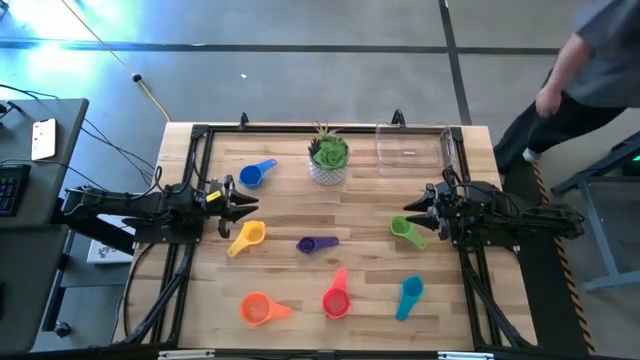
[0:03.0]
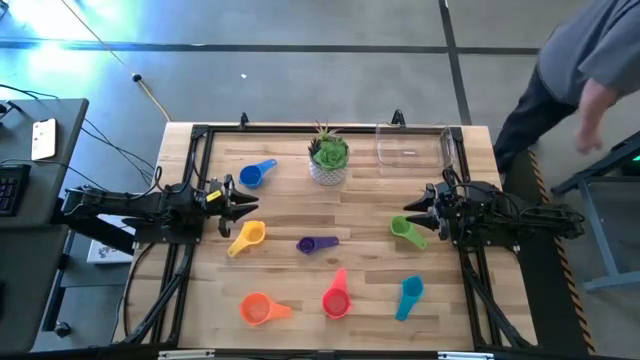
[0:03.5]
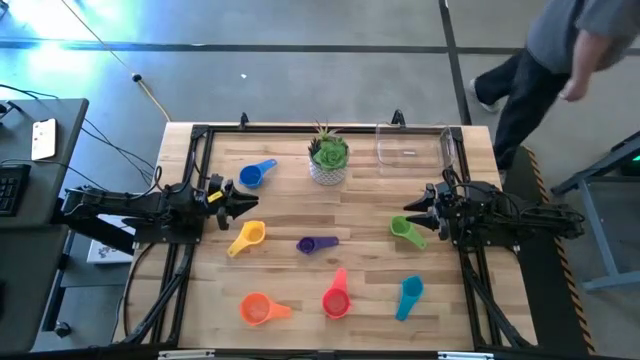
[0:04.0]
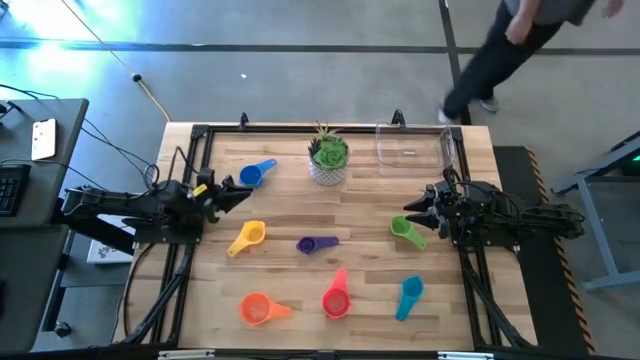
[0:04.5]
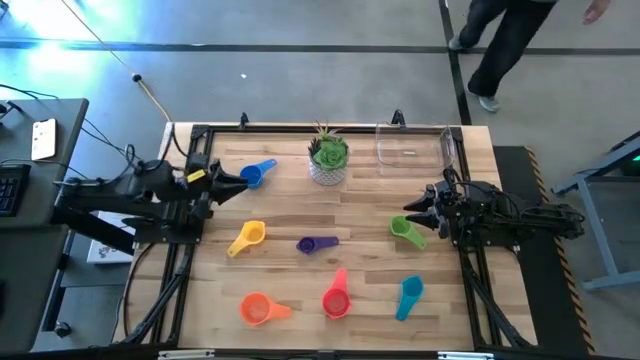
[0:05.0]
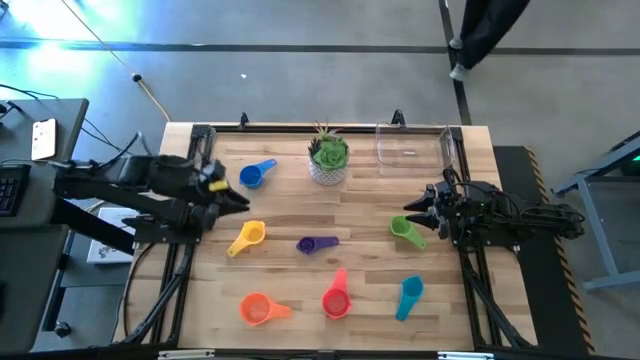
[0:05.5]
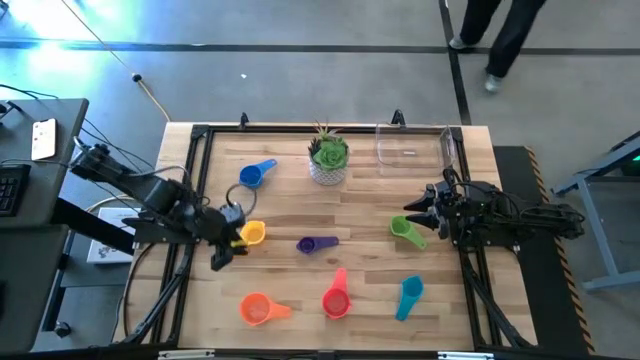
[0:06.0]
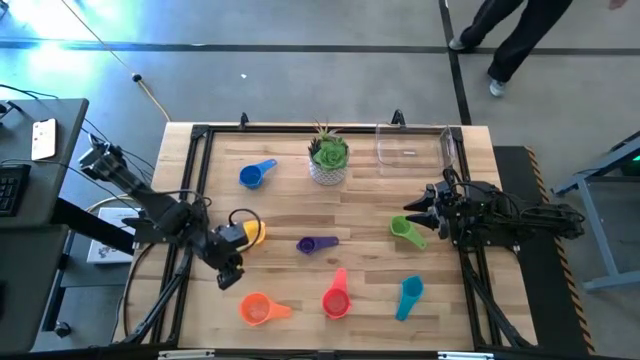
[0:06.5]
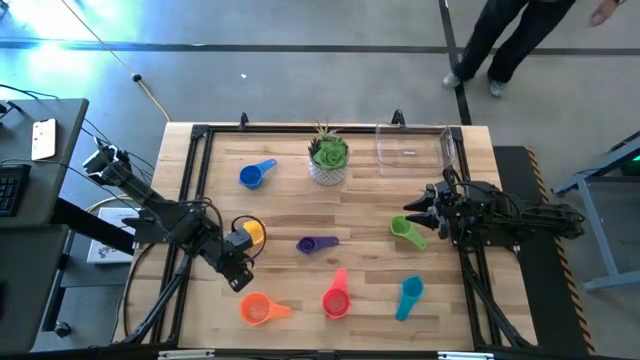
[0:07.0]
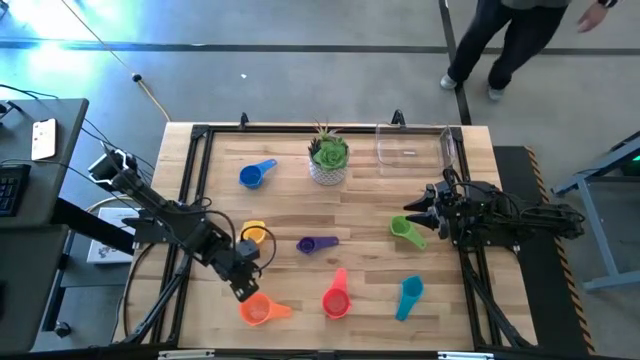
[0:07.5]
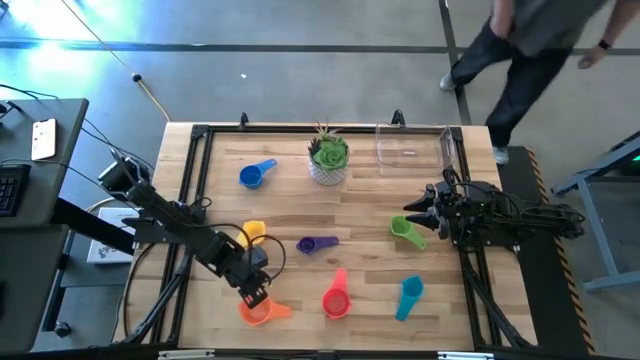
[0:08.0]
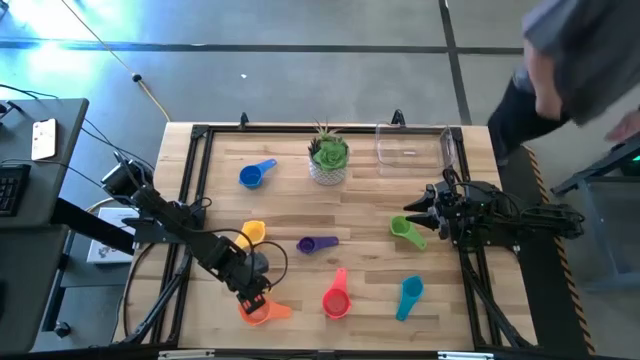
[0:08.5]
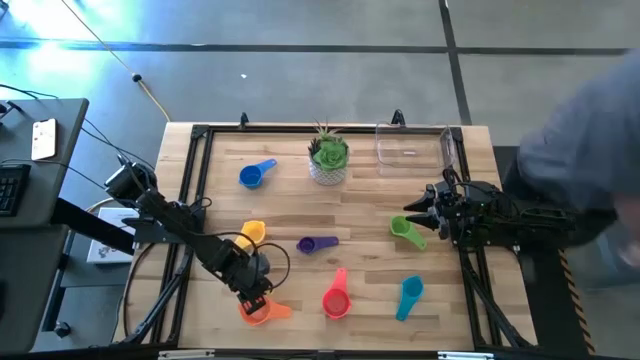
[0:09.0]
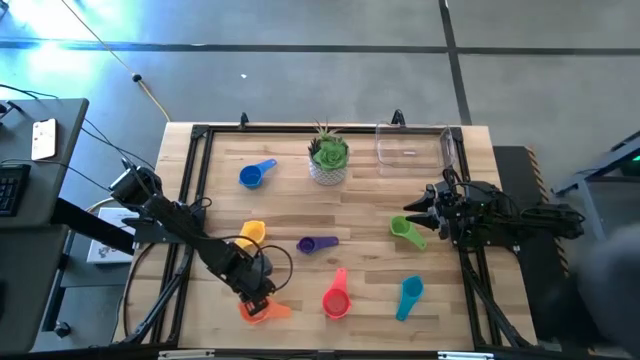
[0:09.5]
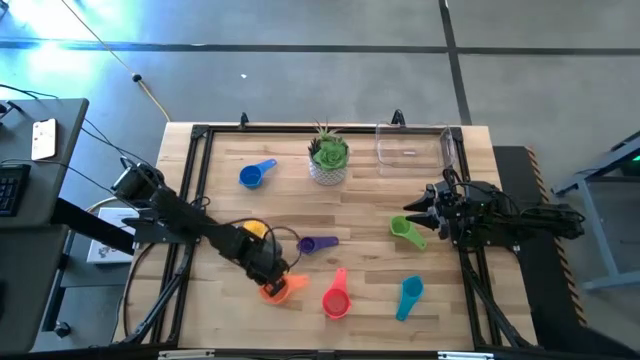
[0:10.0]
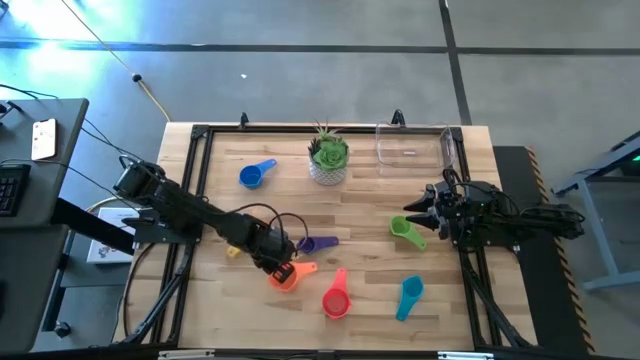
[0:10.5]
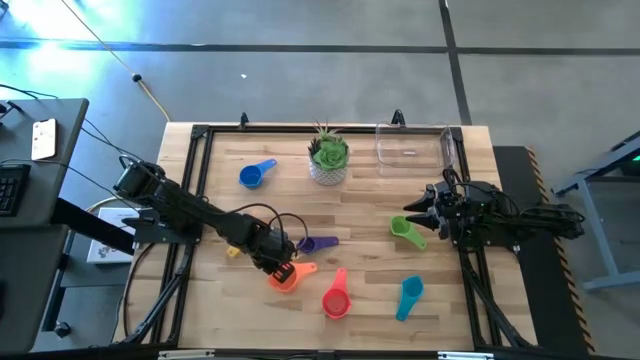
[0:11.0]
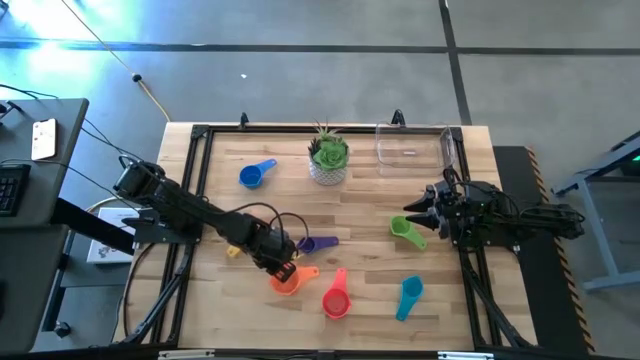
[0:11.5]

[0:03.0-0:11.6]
Task: Nest measuring cups in basket
Prepare the orange measuring cup

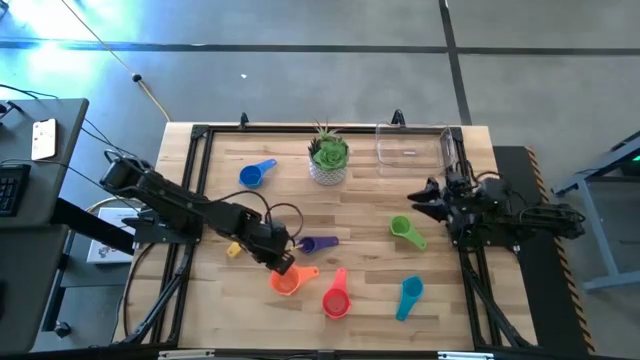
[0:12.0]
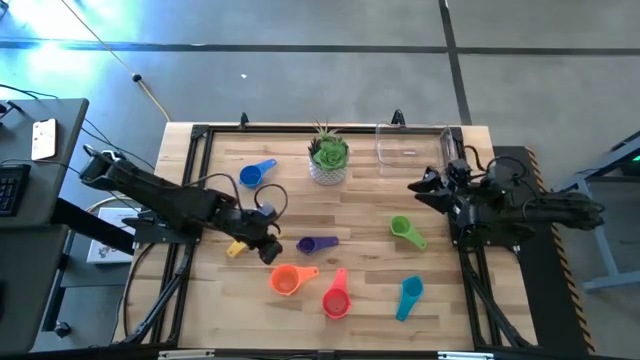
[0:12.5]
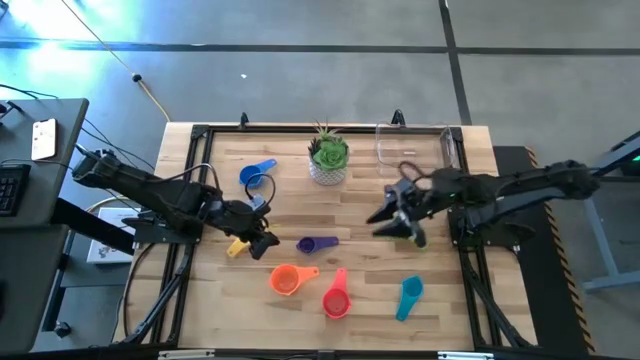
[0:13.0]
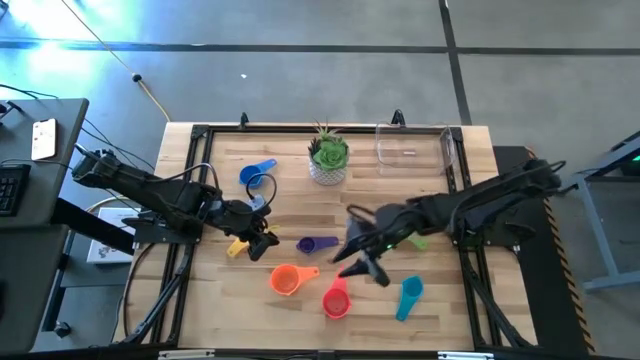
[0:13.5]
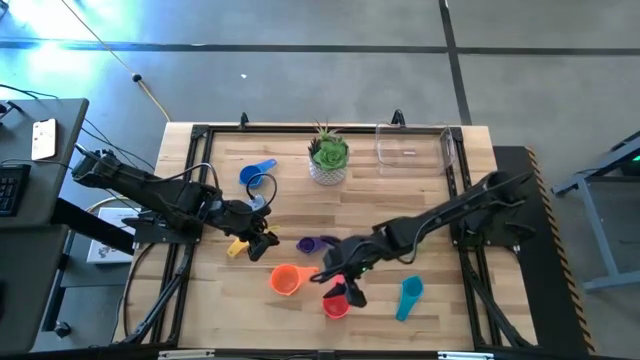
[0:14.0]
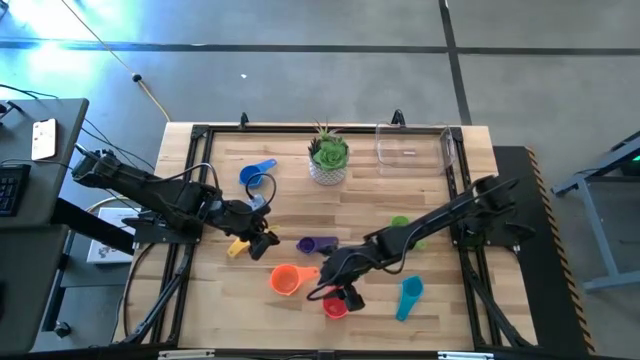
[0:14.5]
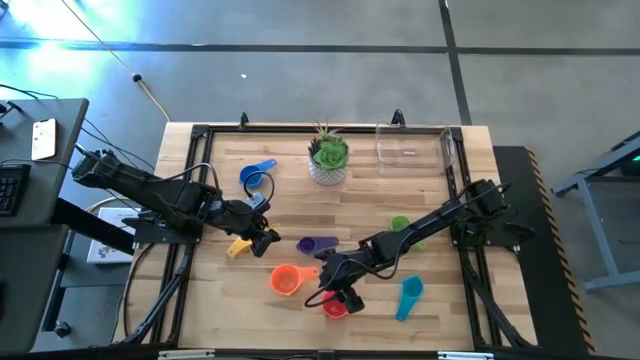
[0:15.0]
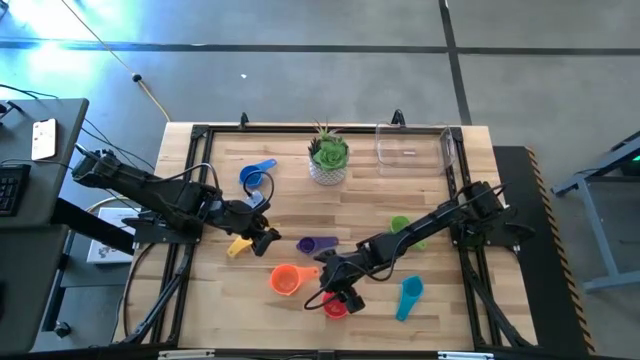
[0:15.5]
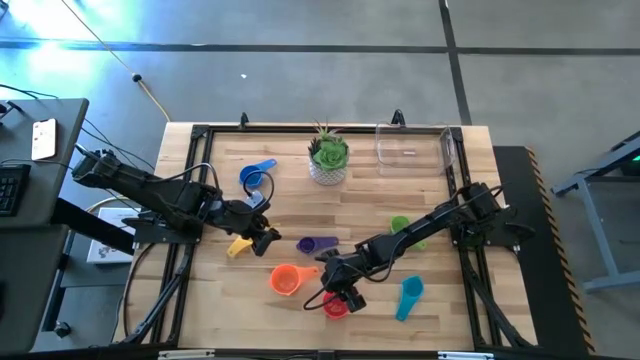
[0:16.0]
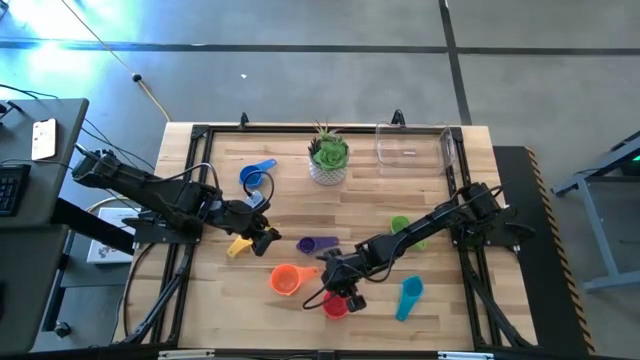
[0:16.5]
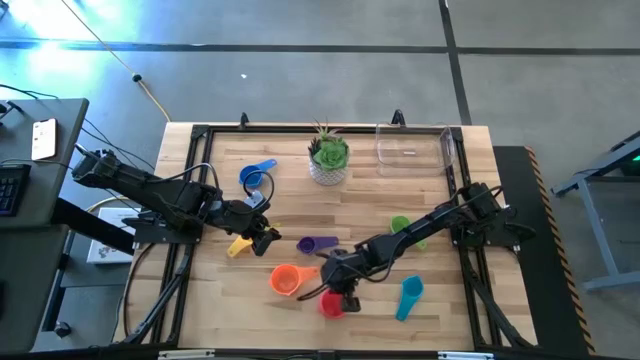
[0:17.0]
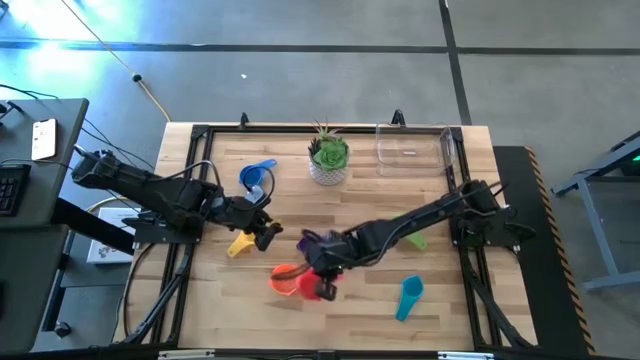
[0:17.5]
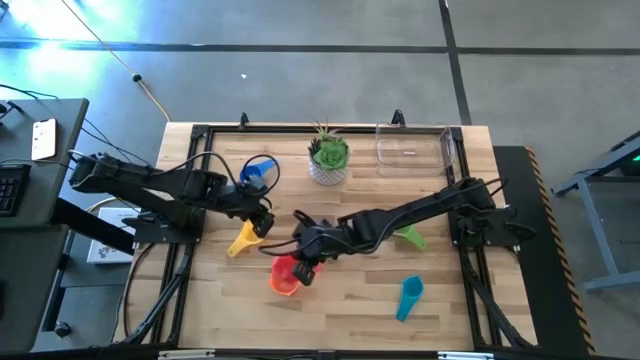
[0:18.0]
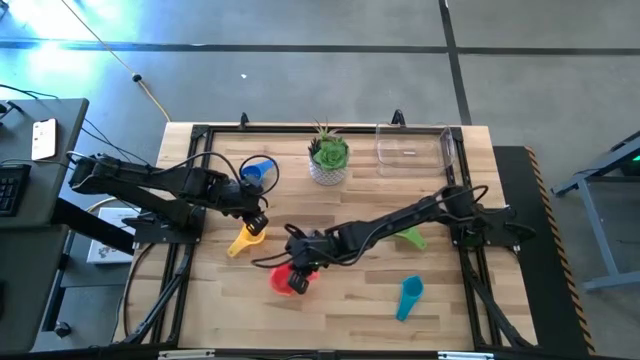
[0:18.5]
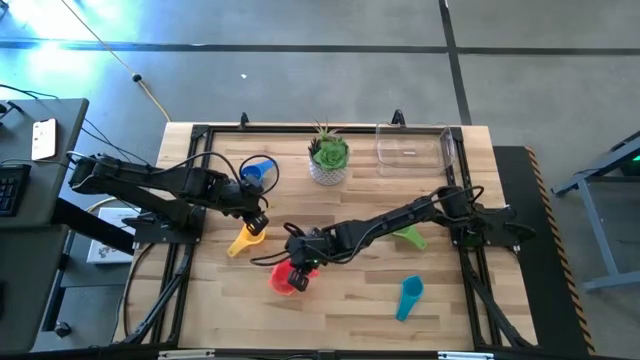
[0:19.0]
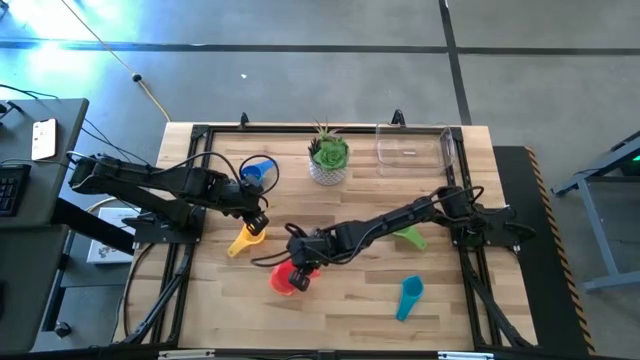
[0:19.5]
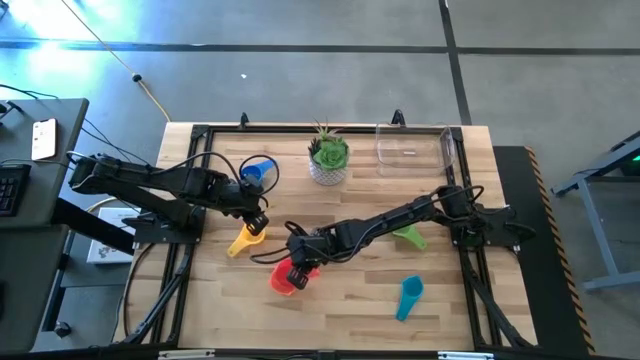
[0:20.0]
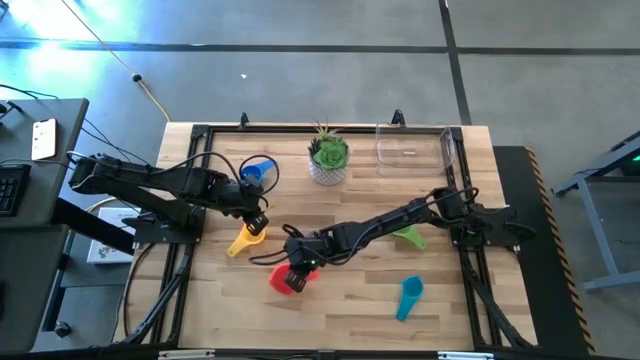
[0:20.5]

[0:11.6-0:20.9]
Stack the red measuring cup on top of the orange measuring cup

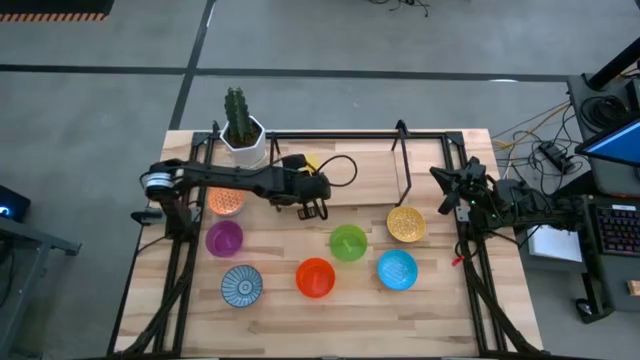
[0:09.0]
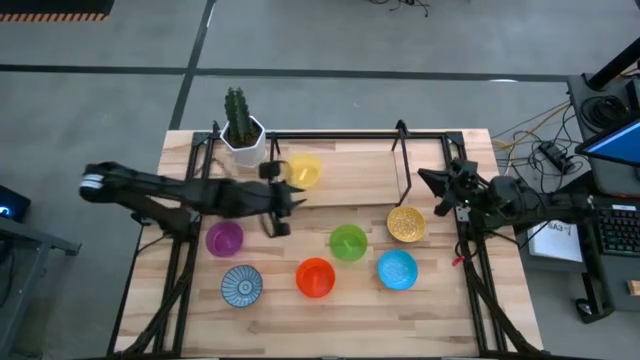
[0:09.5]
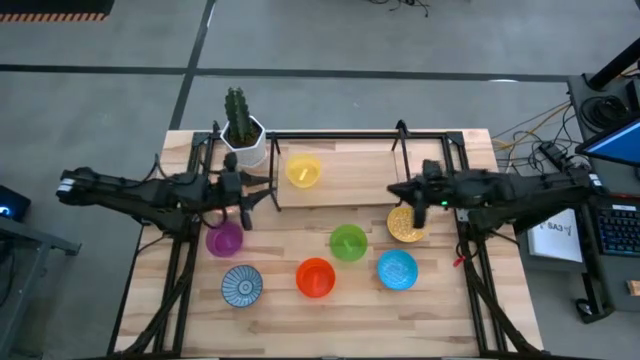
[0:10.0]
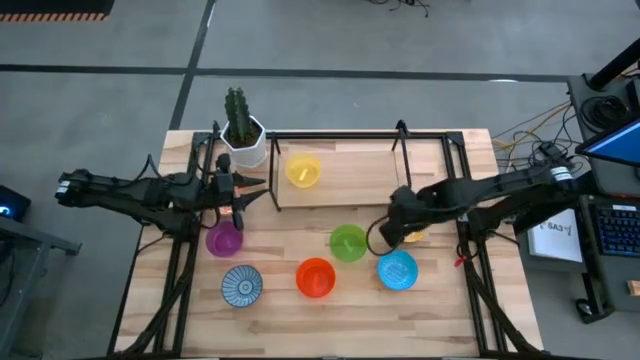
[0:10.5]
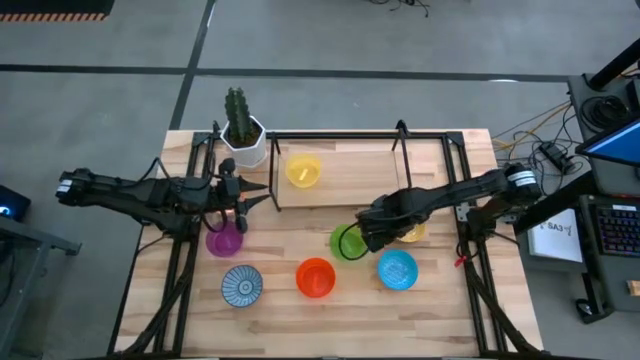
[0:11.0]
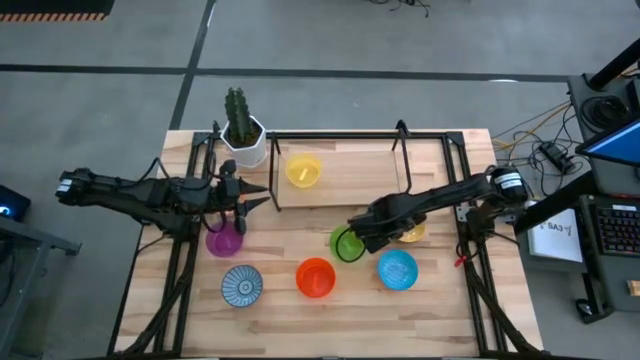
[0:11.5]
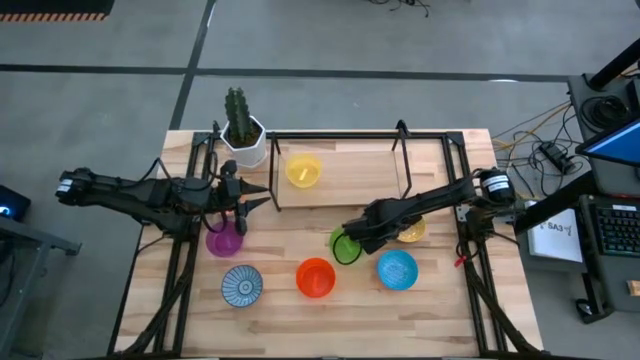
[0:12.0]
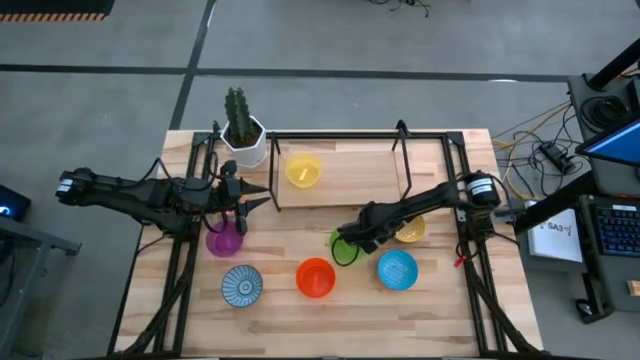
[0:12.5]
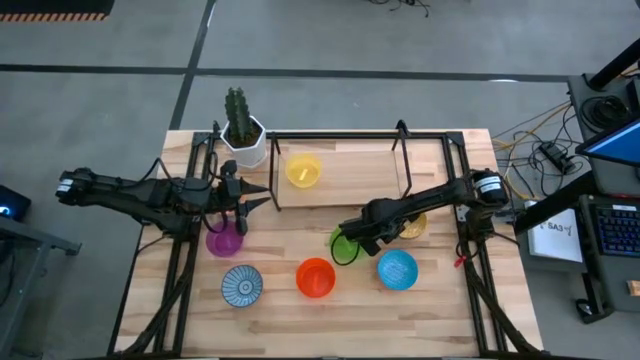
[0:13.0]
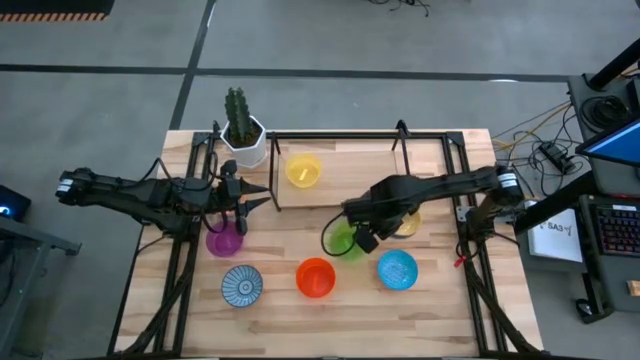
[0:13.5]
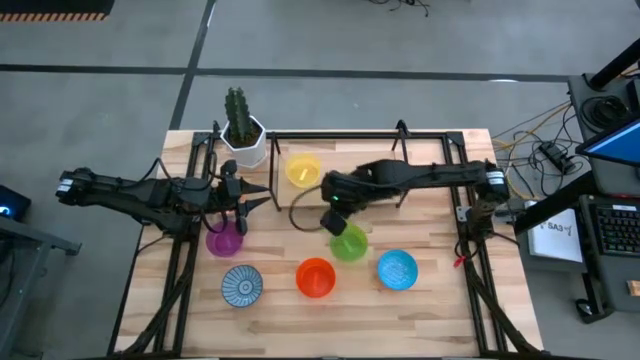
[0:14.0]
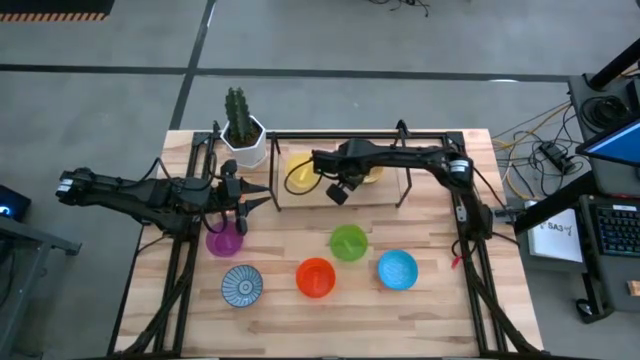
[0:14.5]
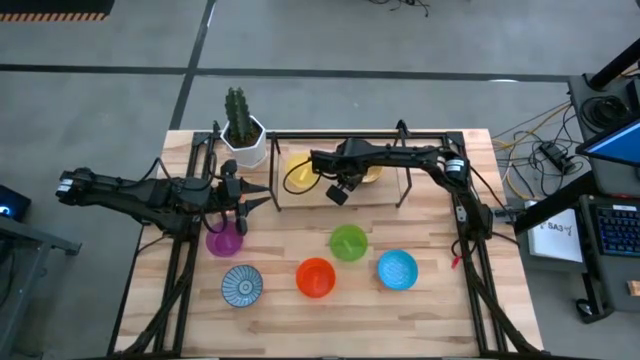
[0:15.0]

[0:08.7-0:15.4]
Task: Place and stack bowls onto a shelf
Put the right yellow pattern bowl on the shelf
